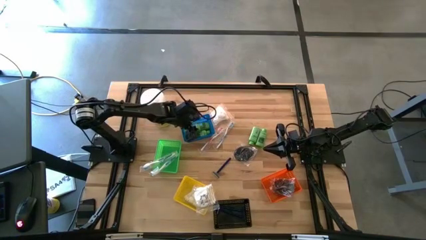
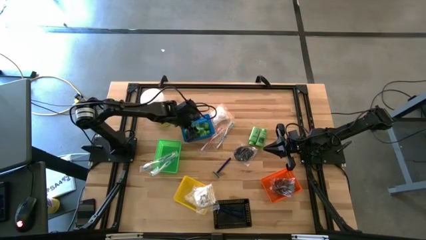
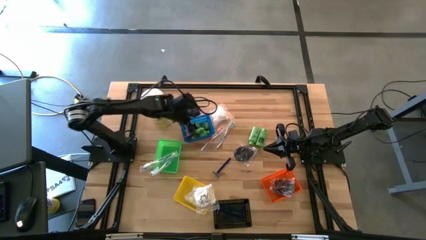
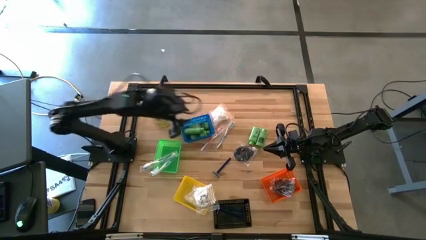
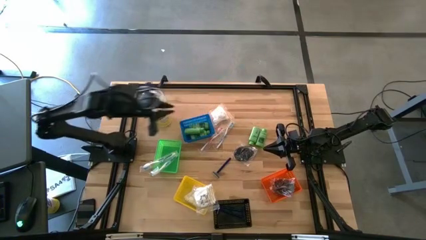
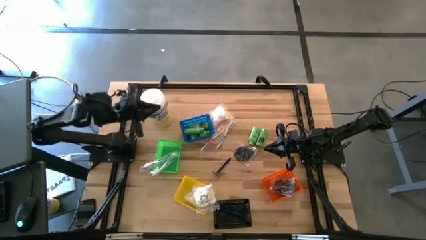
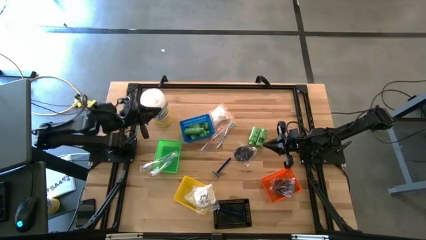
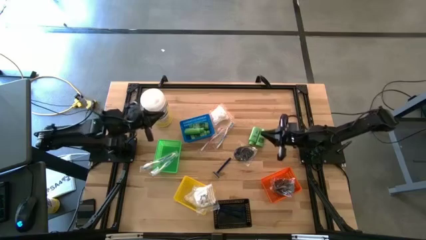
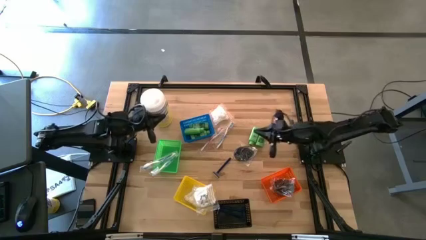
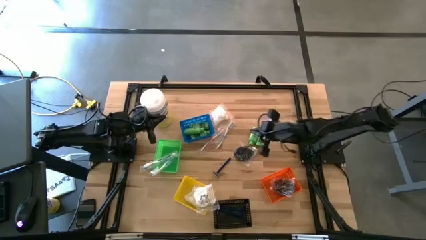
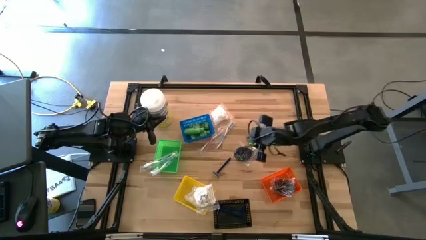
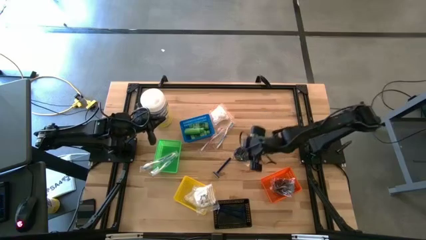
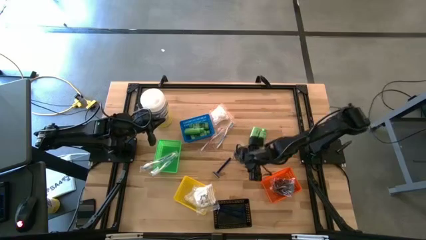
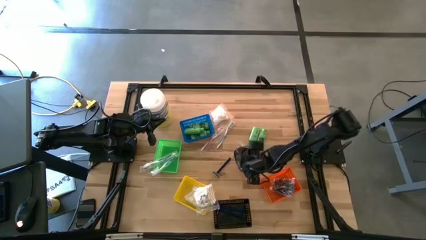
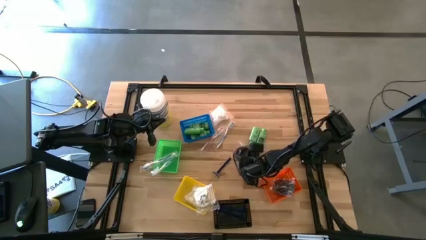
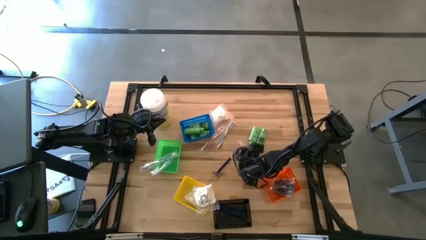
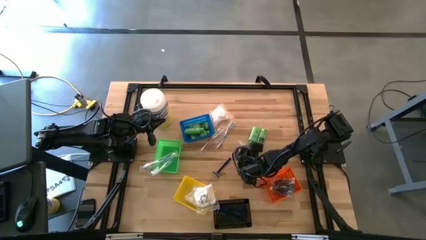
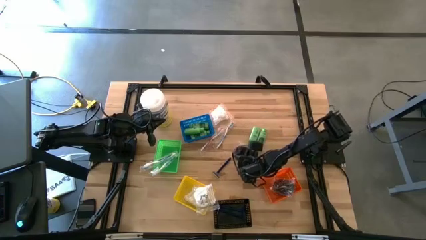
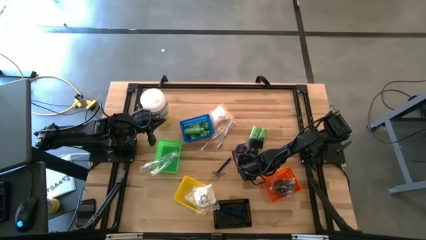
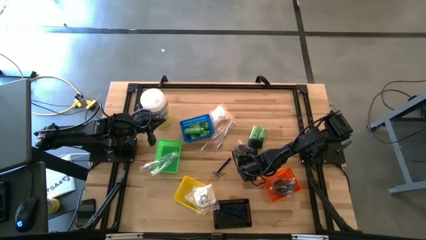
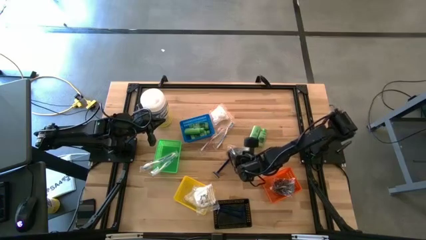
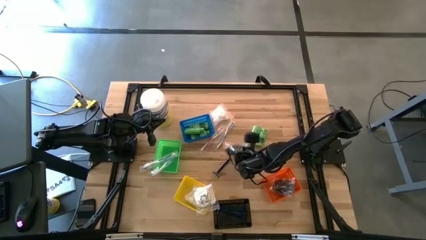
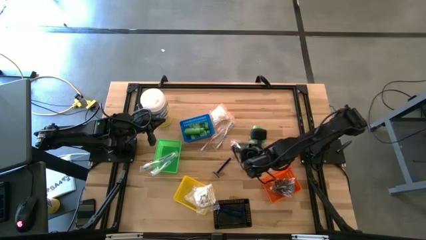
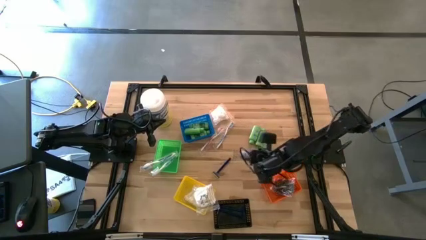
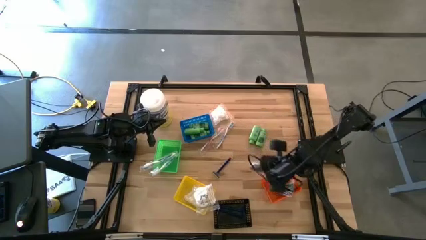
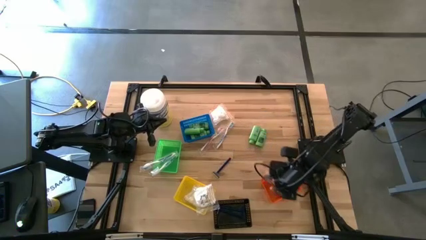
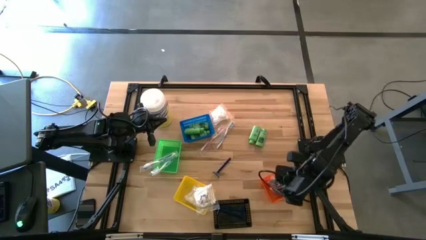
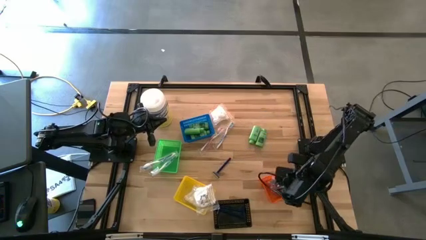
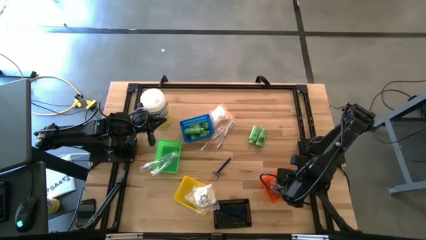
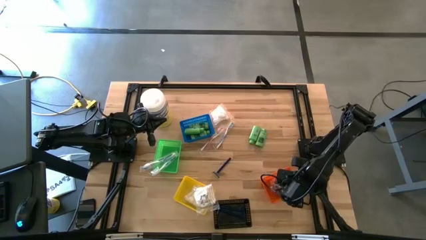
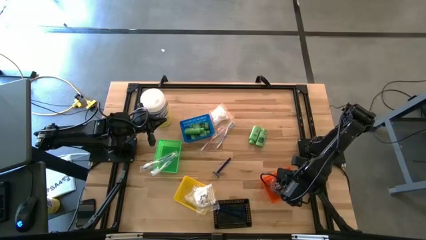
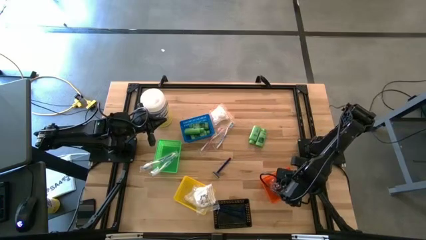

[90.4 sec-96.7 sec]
Task: Pick & Place Travel size toiletries
Put the black hairbrush into the orange bin

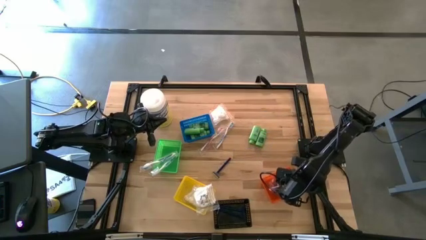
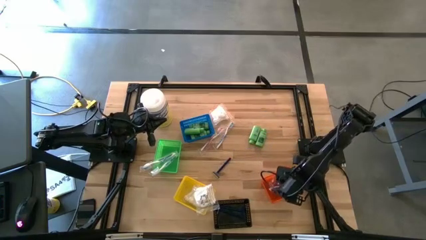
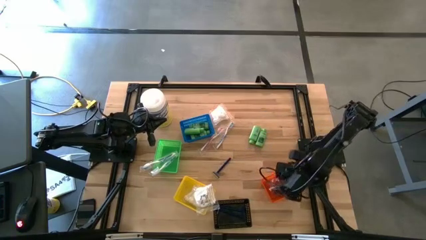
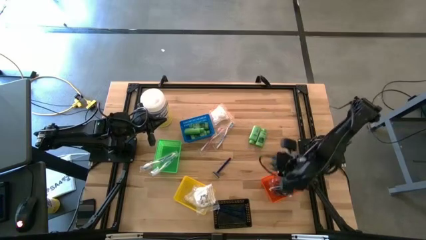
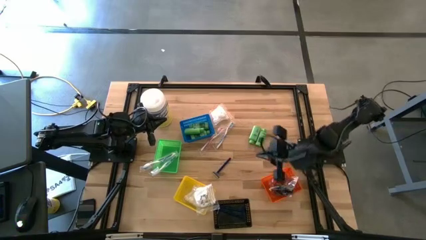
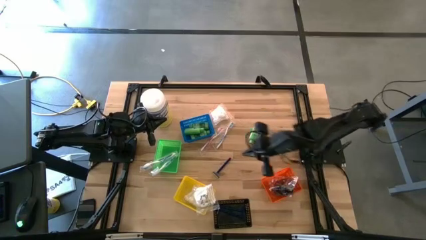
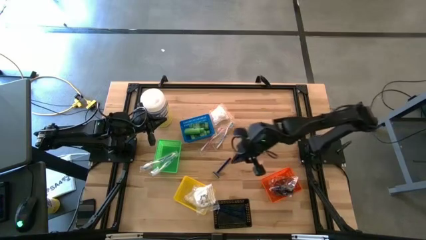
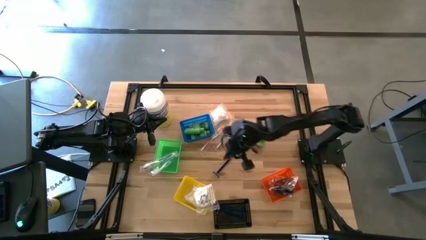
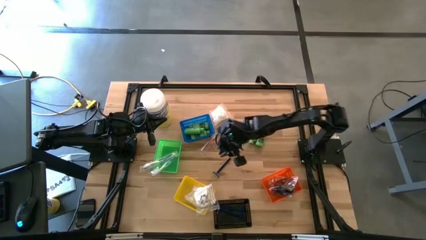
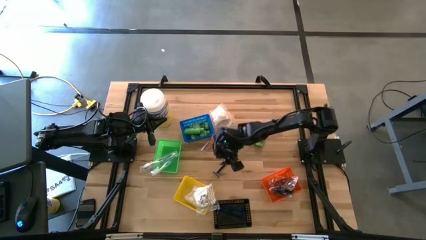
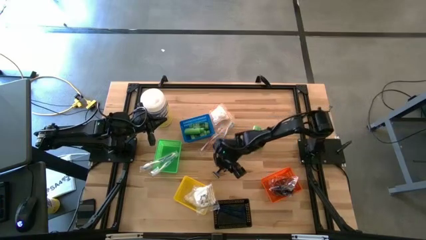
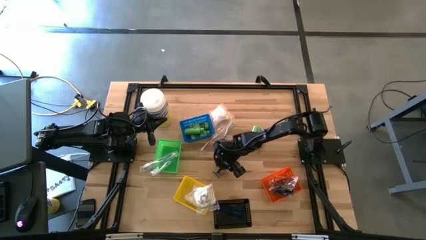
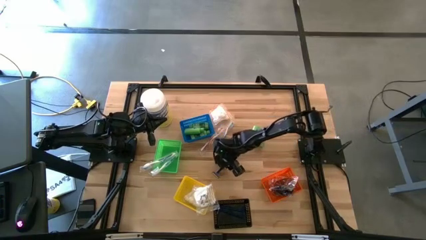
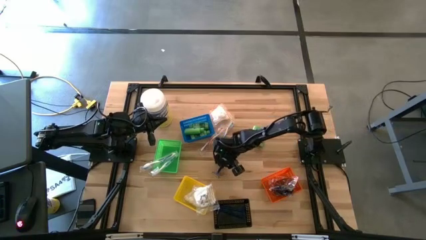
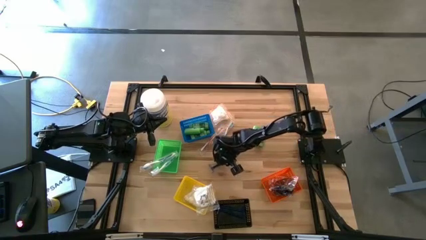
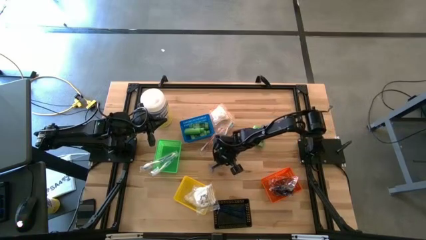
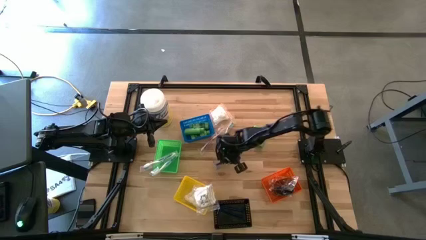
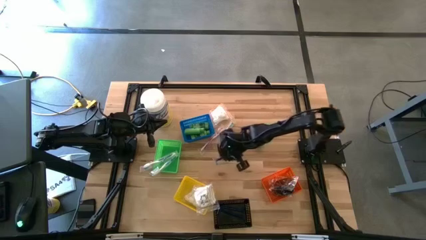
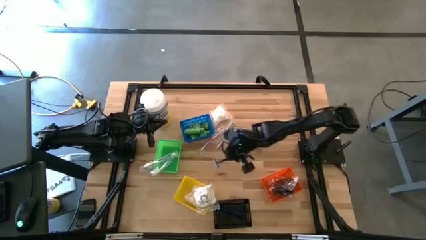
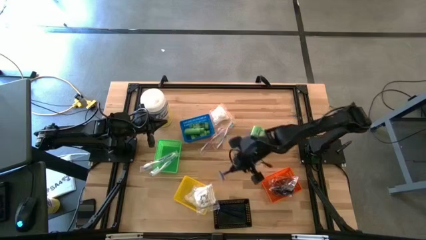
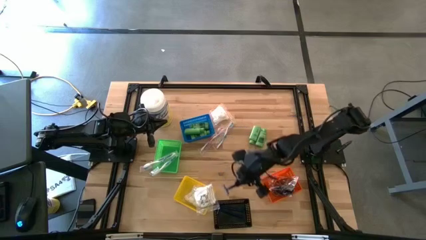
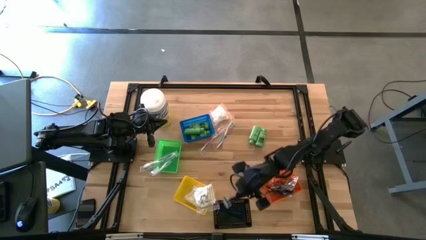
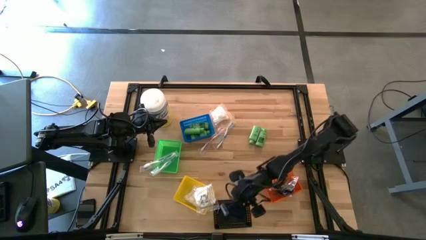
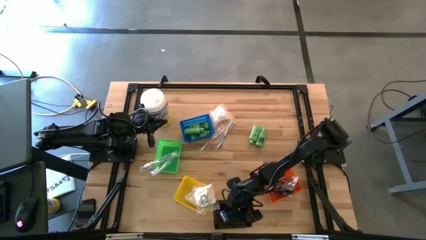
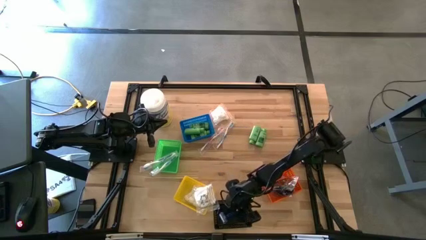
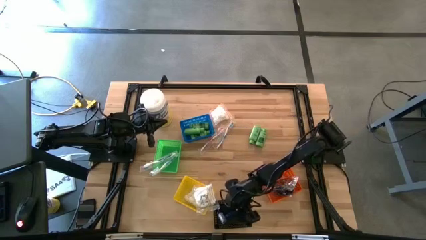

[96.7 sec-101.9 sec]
Put the blue razor into the black bin

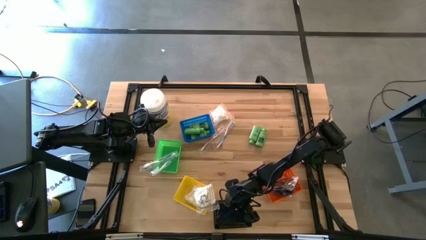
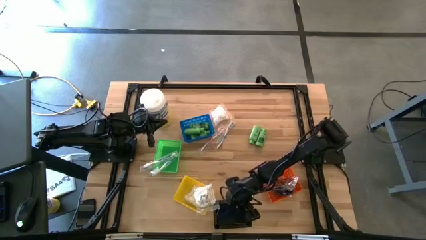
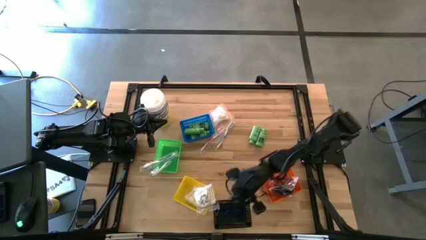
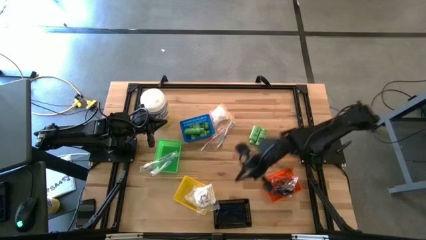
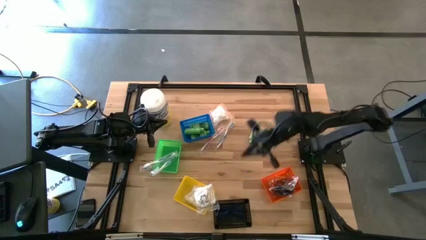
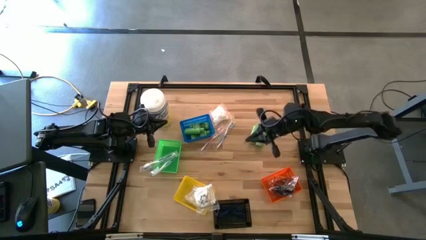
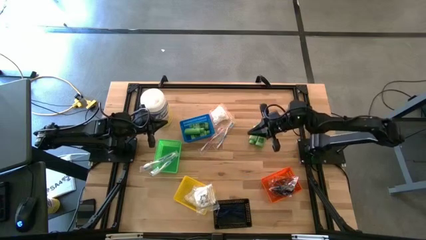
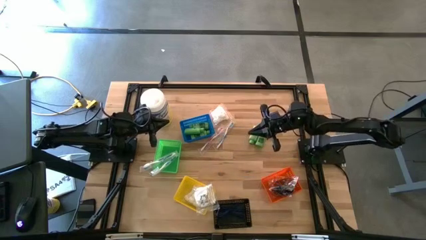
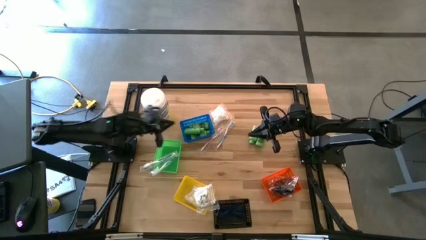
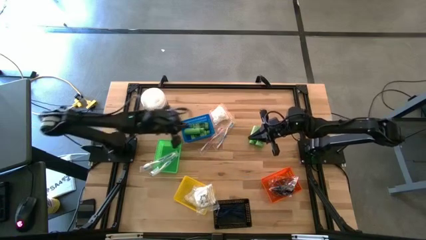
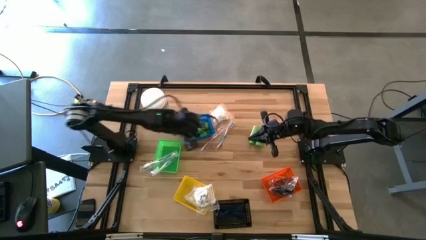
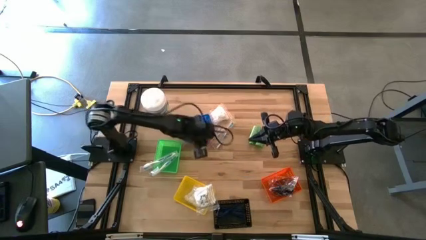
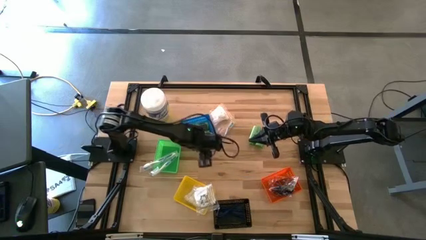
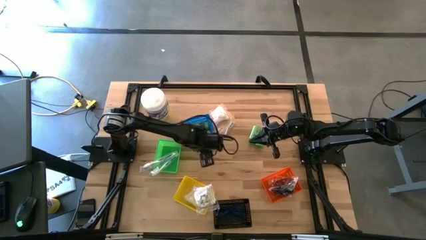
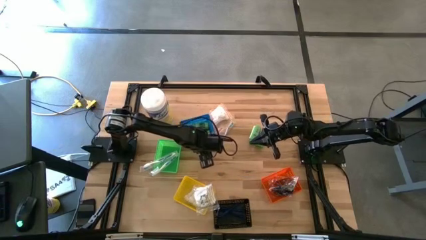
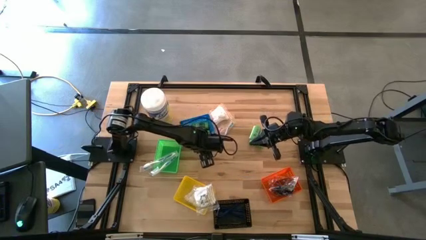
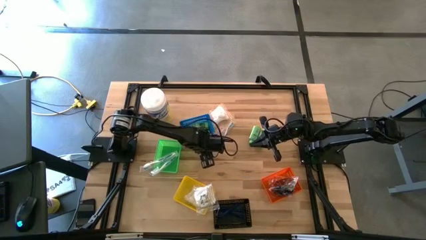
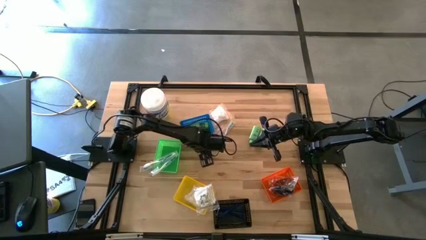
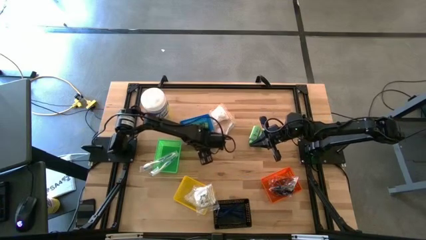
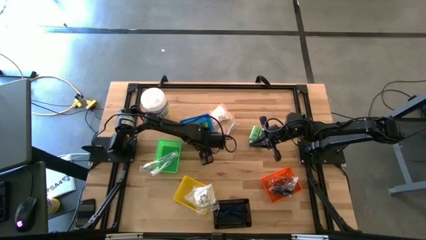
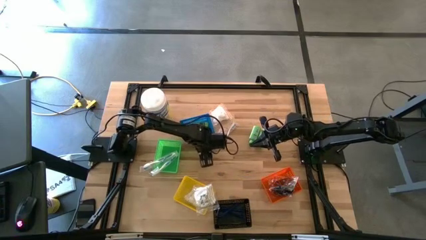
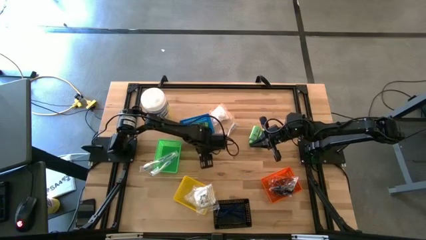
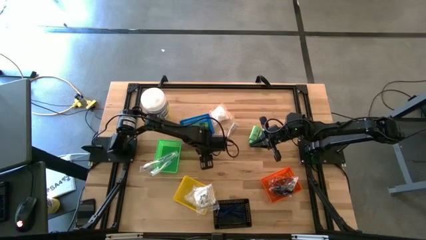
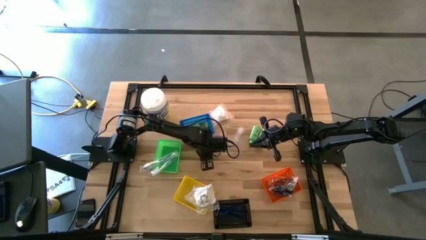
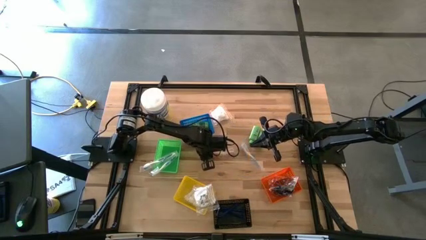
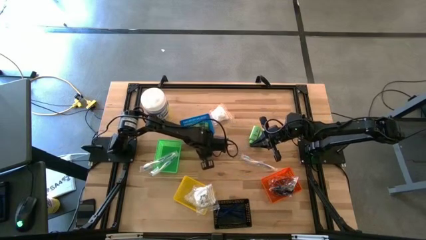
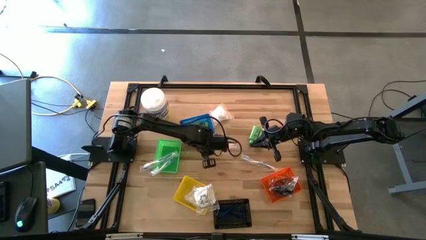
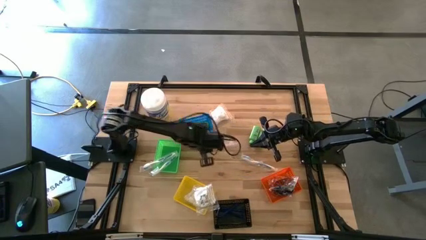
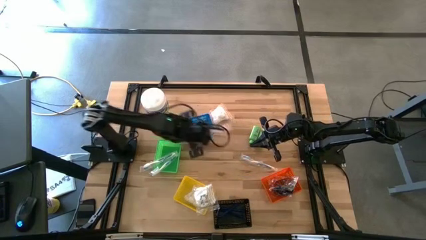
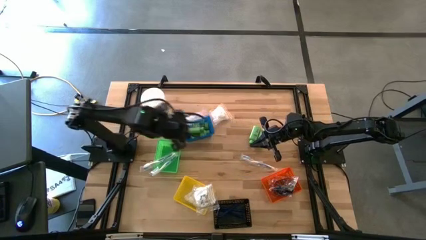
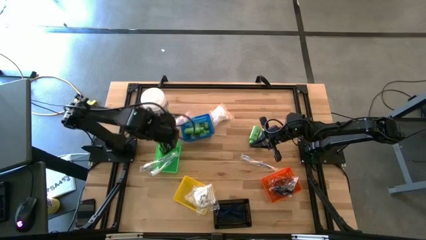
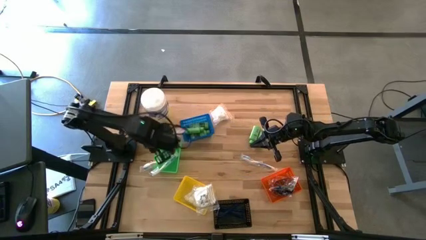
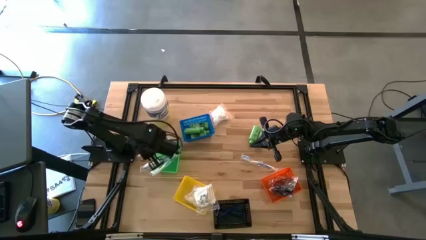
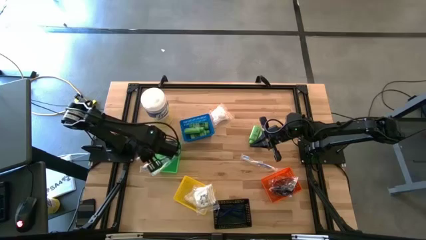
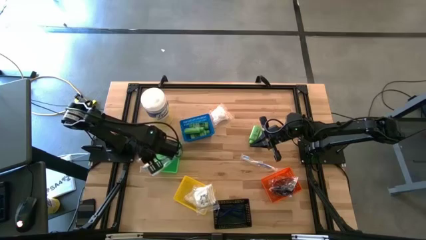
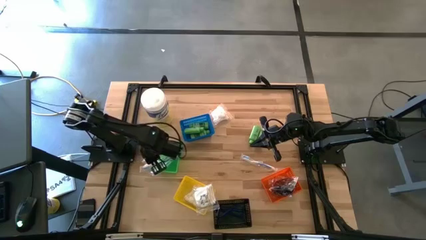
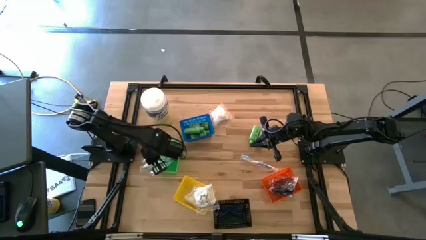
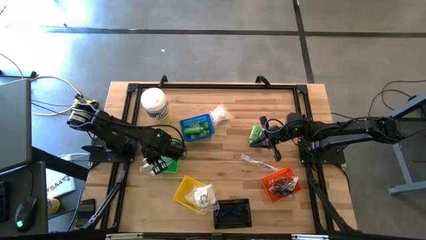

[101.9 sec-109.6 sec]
Put the red toothbrush into the green bin
